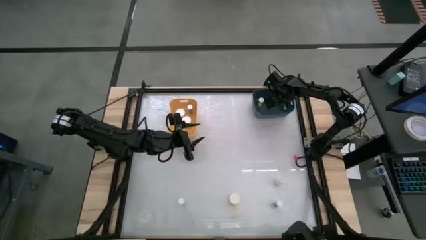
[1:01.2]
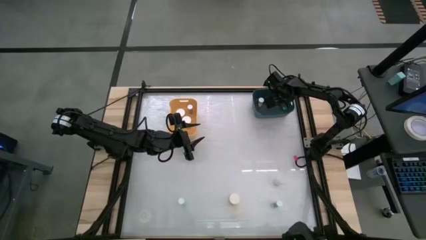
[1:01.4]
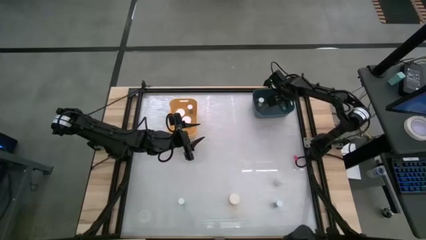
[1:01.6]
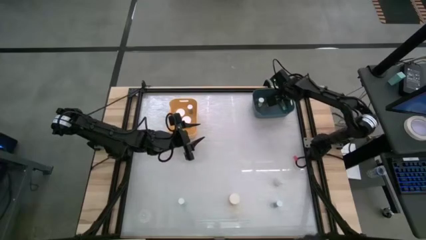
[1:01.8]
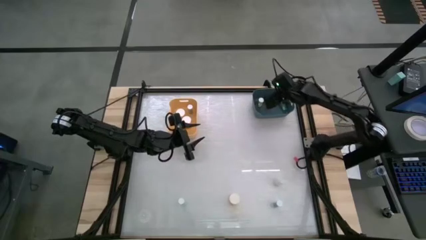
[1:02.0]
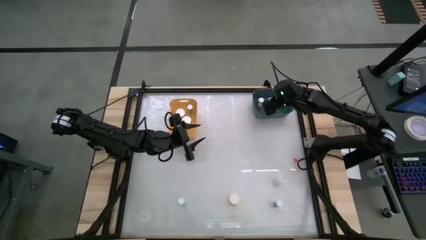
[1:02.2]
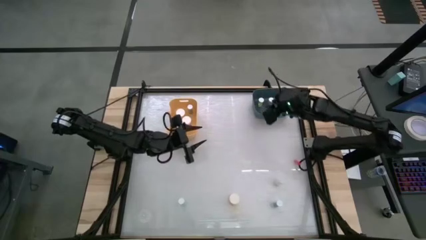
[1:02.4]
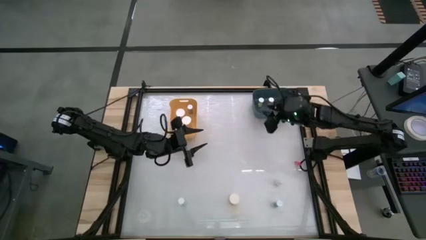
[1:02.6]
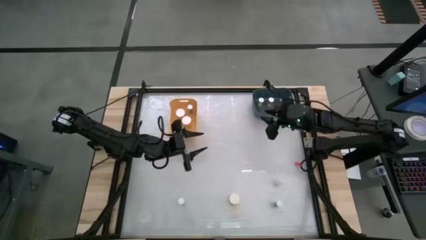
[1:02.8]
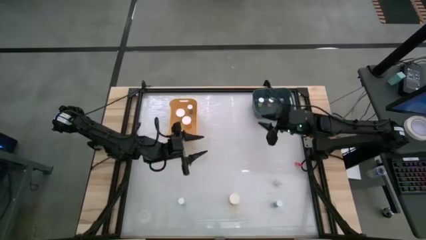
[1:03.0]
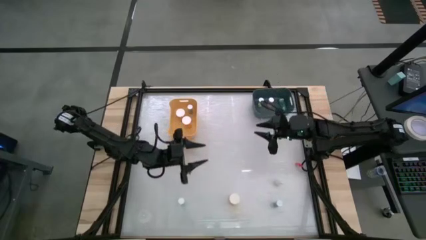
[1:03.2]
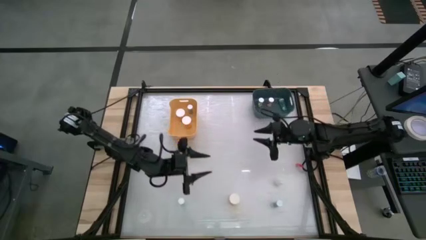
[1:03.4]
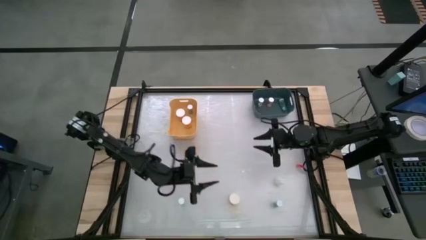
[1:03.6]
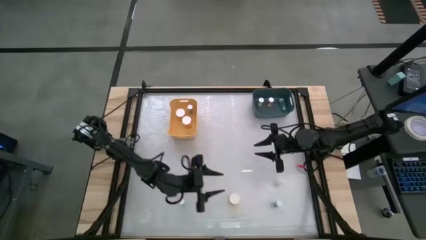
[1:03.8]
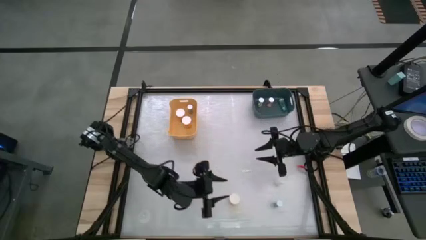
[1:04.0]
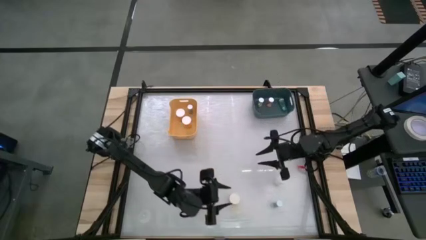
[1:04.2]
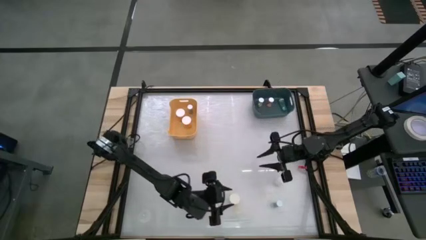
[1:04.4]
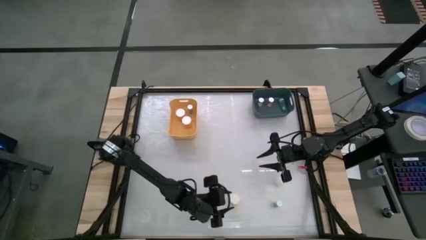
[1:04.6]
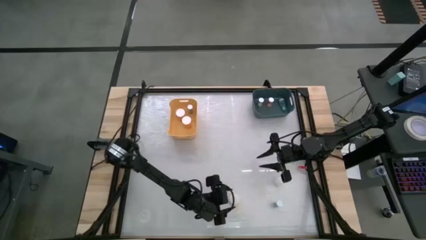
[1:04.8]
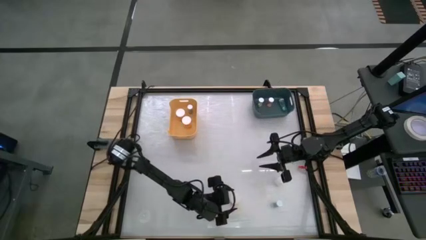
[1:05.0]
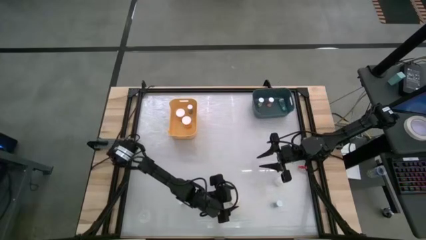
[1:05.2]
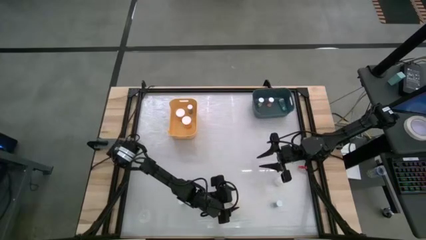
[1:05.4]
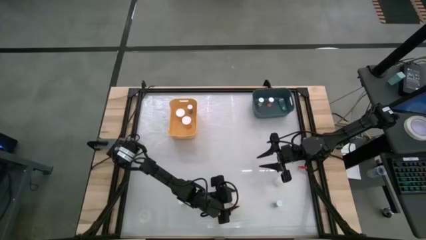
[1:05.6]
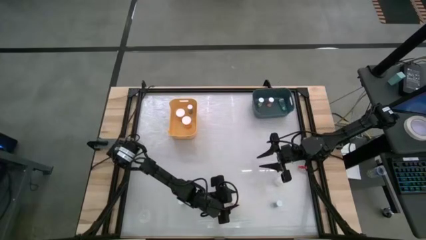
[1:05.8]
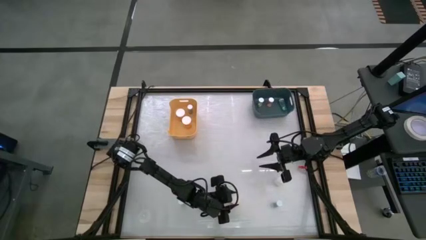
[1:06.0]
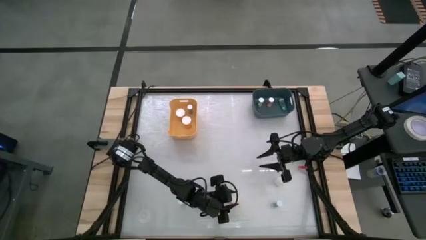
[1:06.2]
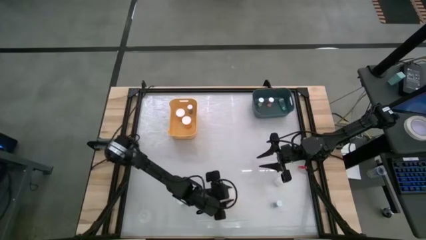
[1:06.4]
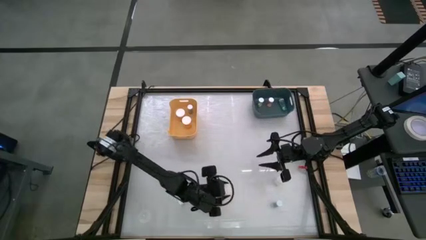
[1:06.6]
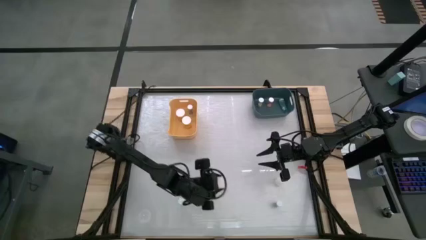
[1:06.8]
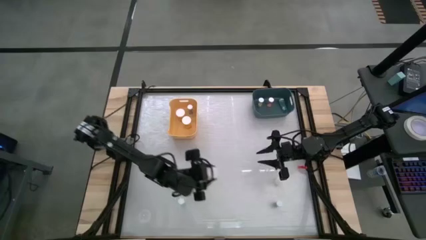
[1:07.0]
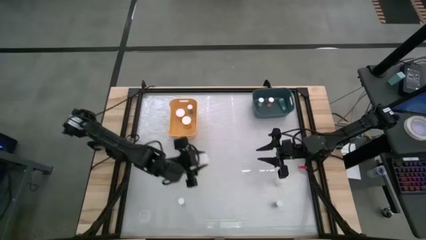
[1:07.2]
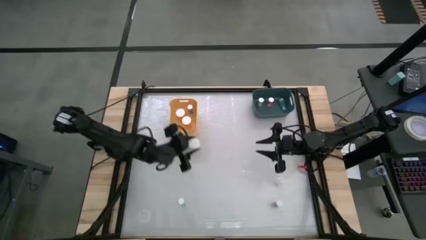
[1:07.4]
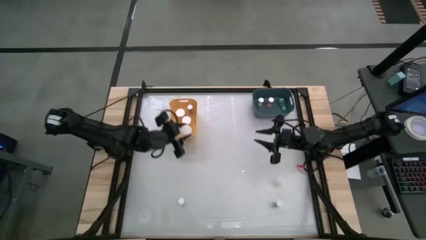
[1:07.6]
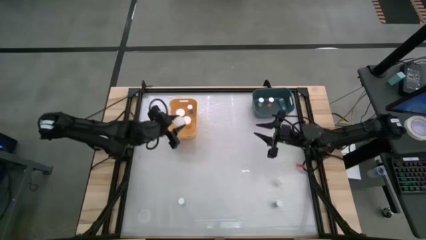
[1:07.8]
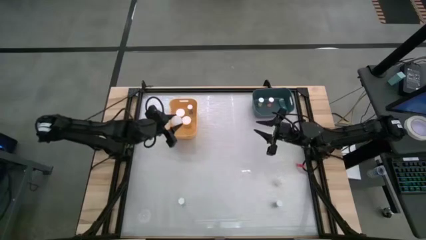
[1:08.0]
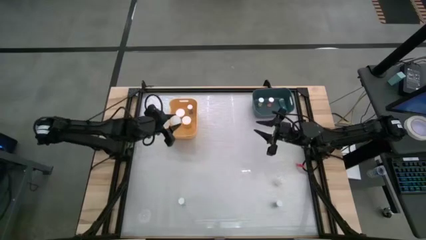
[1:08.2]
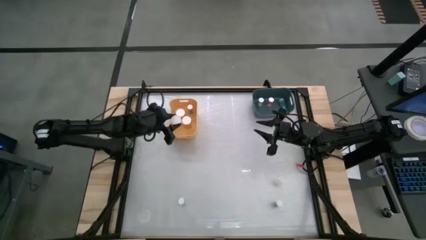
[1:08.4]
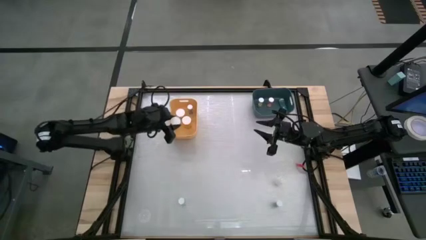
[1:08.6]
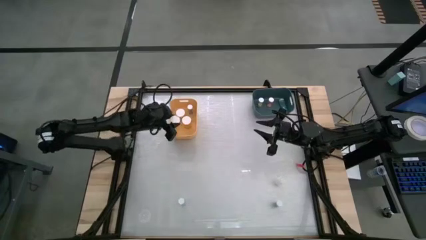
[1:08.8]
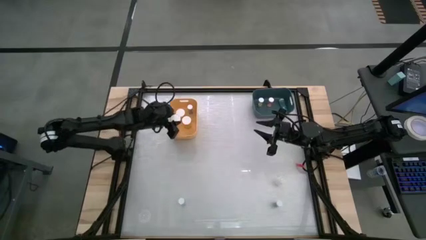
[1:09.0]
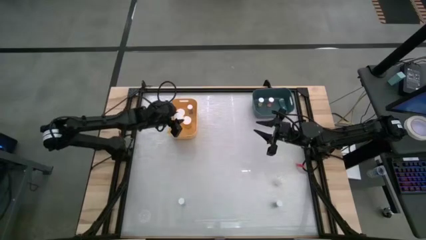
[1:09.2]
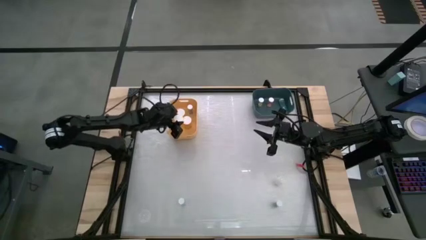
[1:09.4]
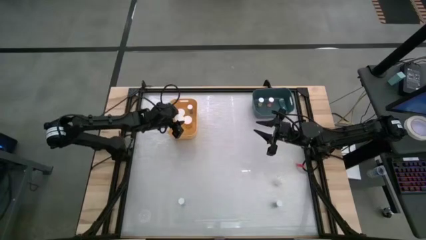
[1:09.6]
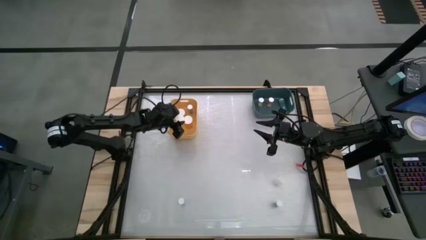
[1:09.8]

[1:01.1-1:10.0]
Task: Pick and place medicine bottles into bin by pill shape (circle, oval)
Put the blue bottle pill into the blue bin

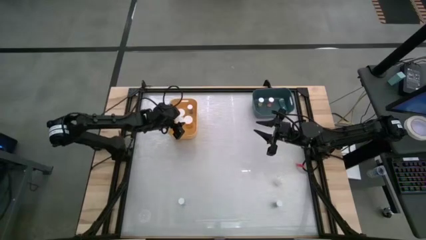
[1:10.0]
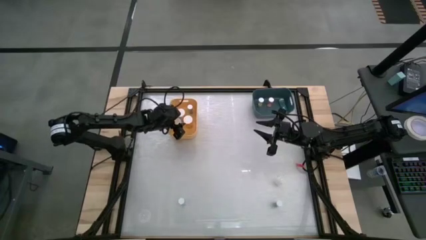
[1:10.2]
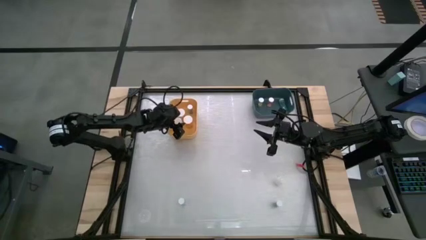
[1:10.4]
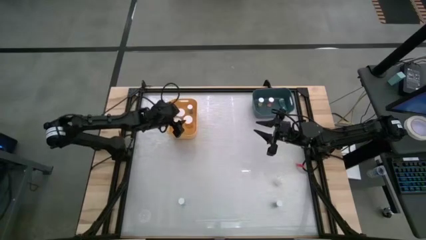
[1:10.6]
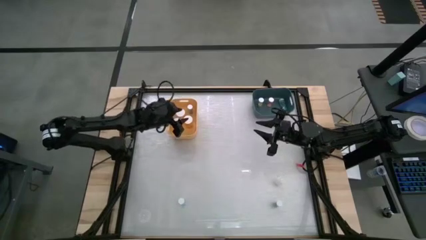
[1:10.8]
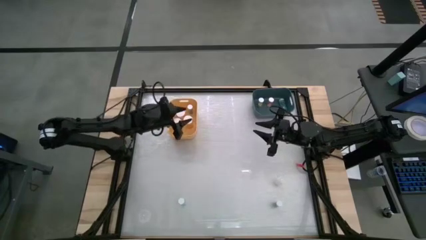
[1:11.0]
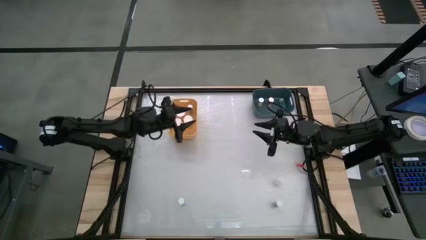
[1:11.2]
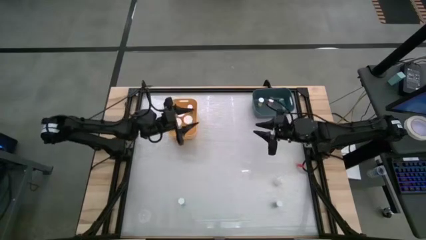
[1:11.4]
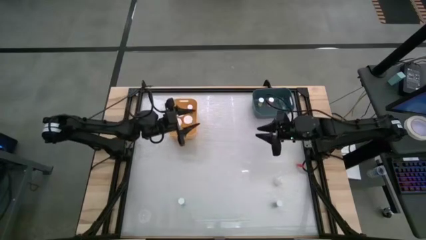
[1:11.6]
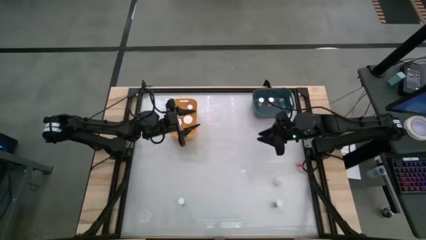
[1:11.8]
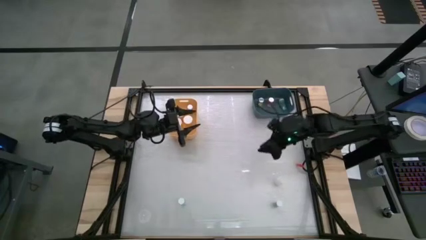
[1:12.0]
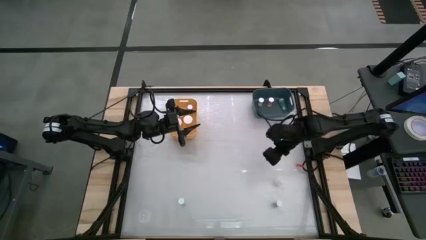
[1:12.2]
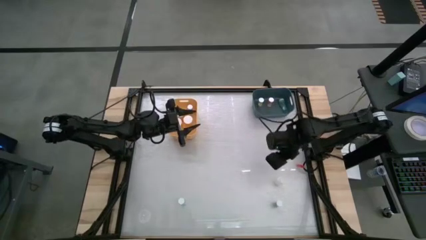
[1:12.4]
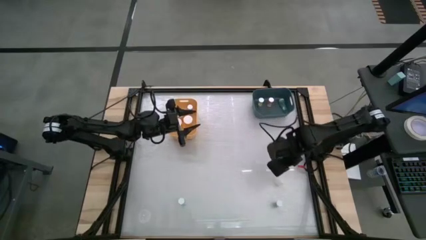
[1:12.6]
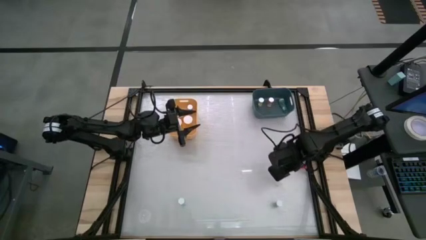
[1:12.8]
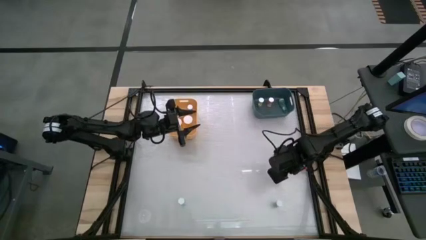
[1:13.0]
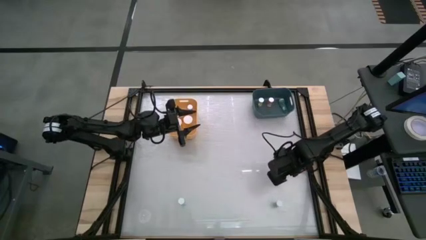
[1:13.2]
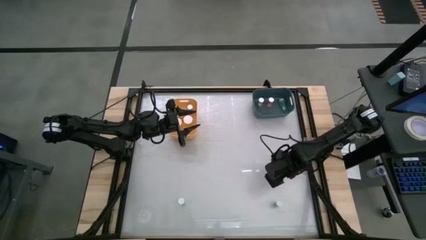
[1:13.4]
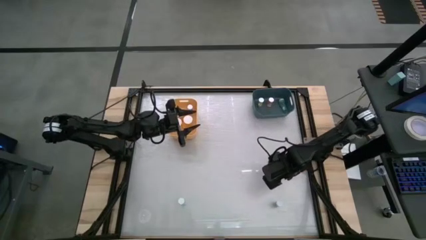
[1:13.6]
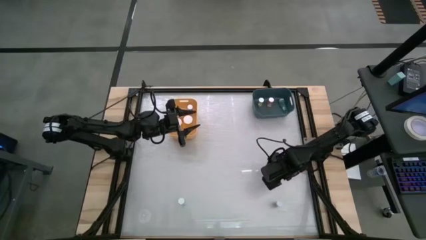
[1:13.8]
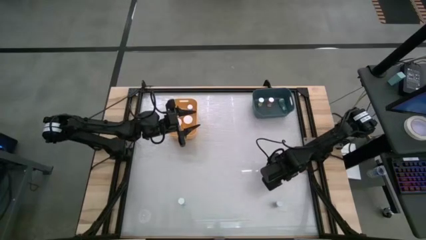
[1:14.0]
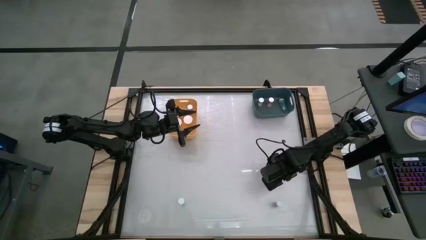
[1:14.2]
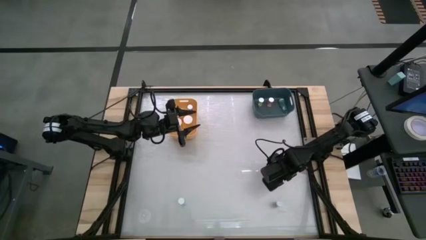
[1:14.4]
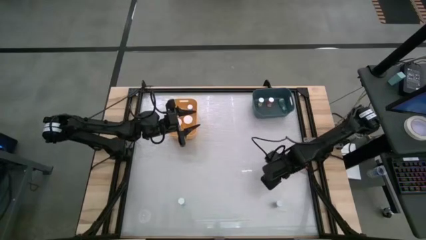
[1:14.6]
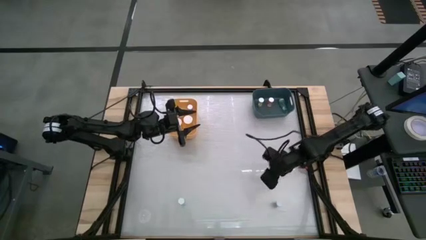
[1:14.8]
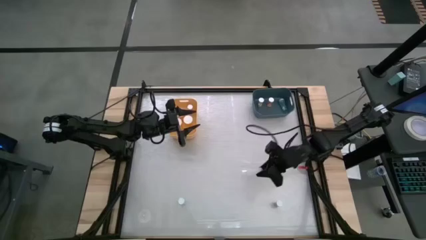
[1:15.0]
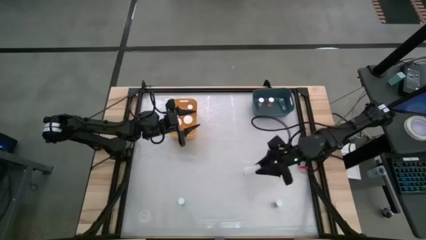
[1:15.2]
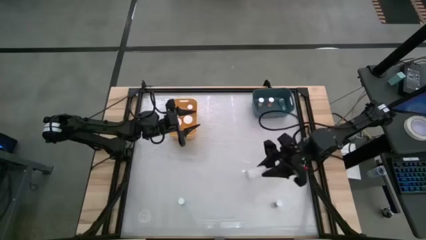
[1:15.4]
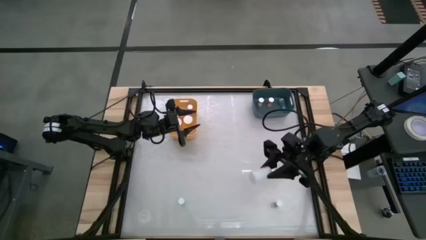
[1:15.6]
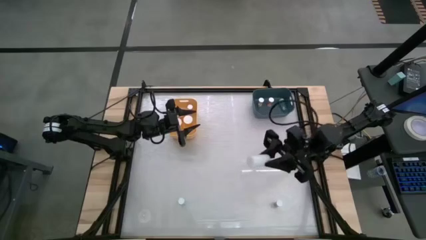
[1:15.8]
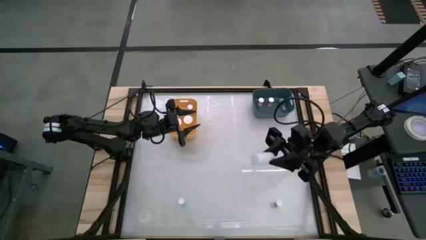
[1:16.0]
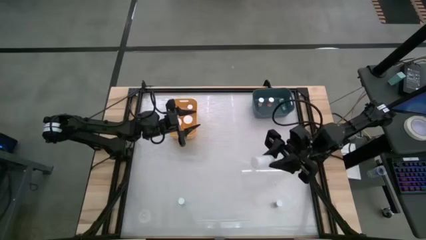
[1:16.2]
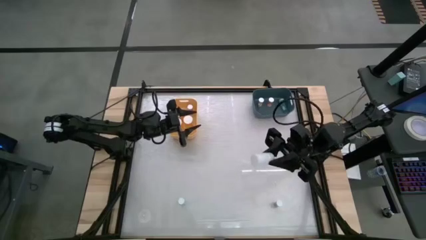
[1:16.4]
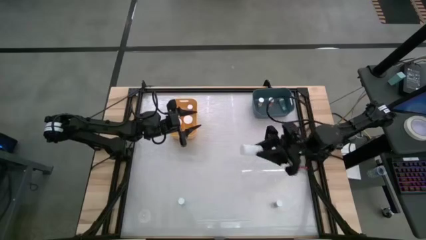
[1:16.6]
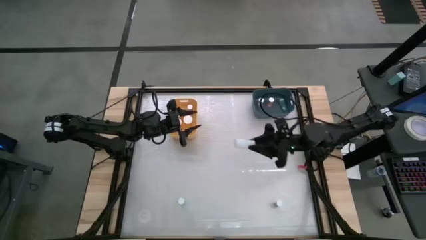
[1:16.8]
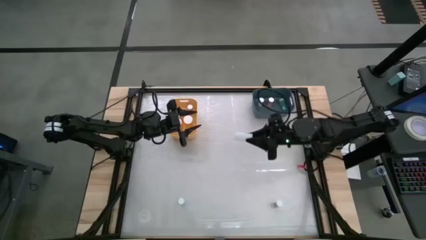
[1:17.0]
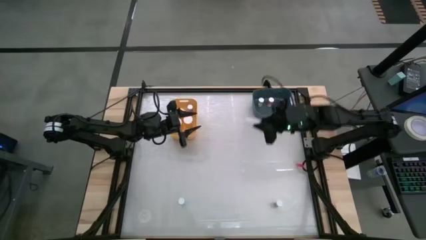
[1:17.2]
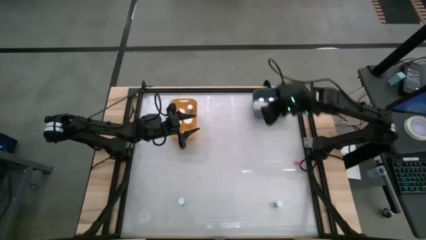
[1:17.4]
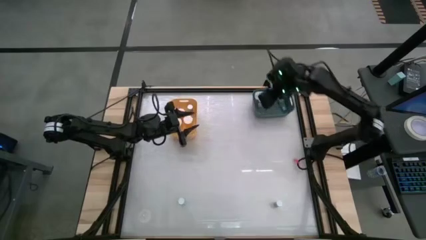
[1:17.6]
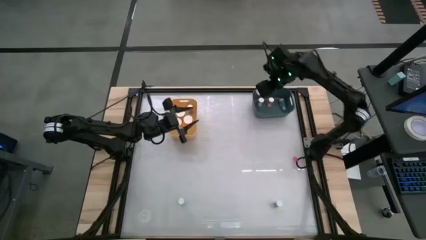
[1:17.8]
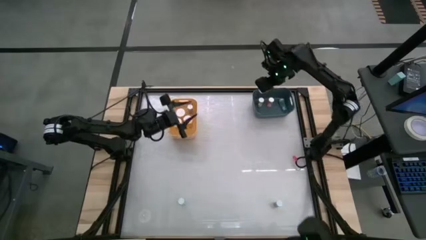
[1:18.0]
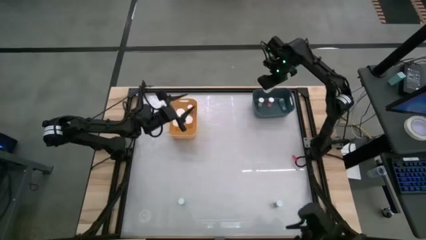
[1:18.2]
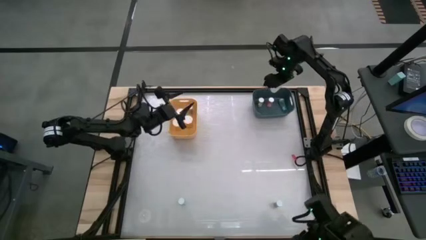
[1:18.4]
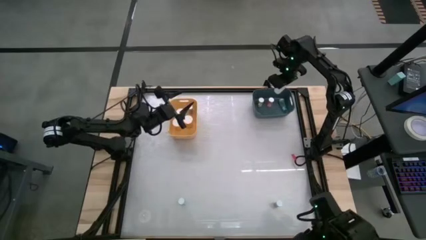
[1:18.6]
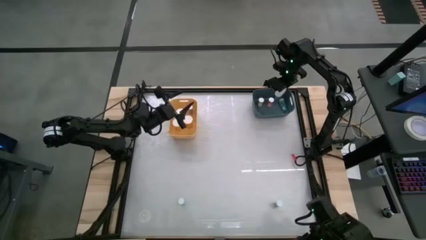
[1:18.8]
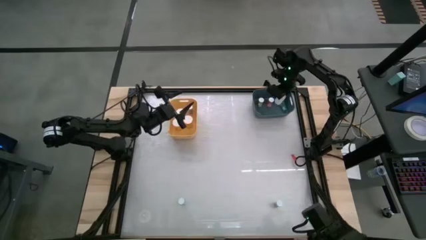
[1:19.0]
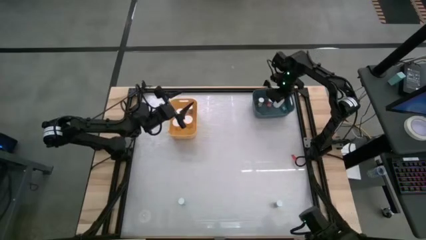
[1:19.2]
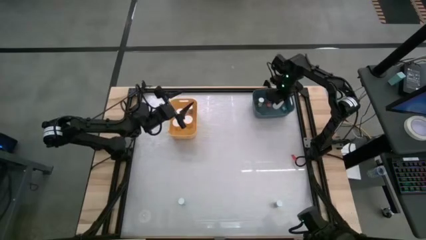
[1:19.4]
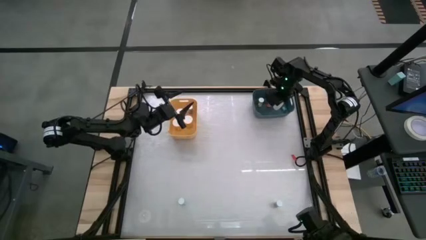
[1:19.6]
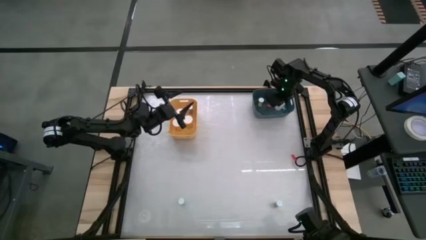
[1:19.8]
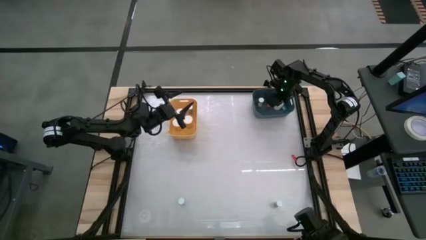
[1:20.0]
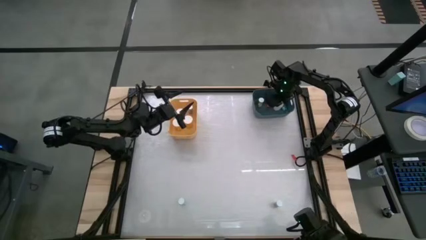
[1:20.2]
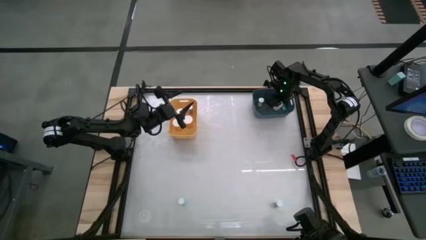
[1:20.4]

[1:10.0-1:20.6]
Put the orange bottle pill into the yellow bin
